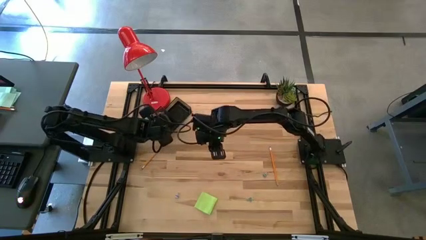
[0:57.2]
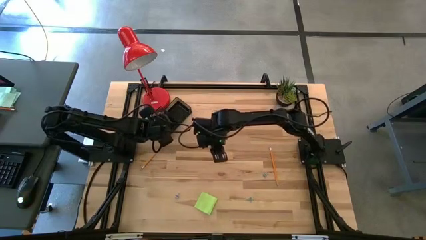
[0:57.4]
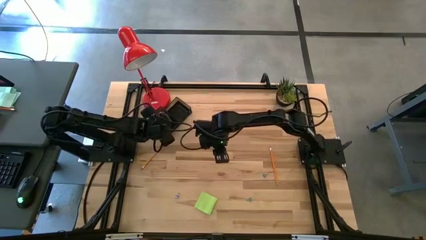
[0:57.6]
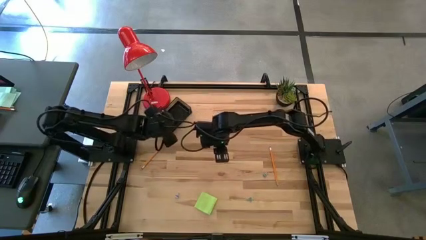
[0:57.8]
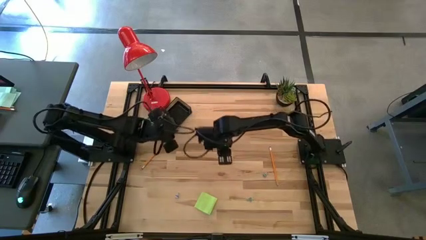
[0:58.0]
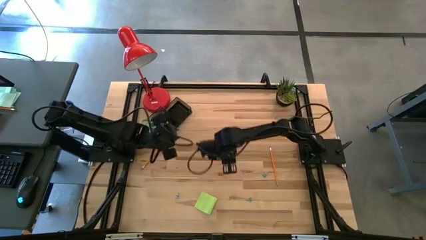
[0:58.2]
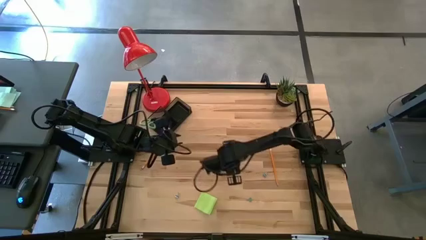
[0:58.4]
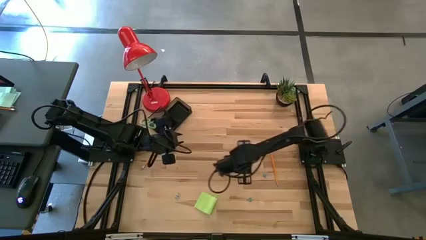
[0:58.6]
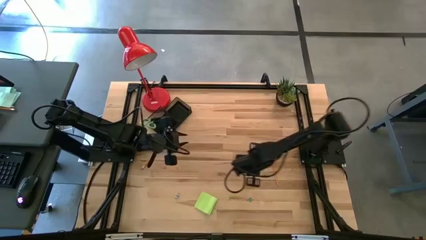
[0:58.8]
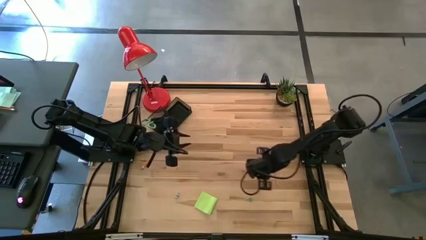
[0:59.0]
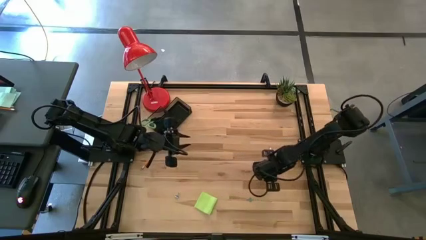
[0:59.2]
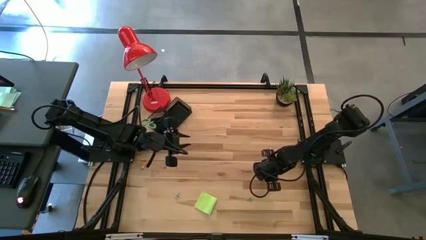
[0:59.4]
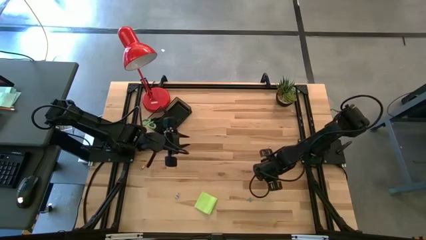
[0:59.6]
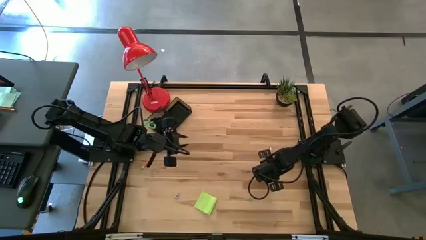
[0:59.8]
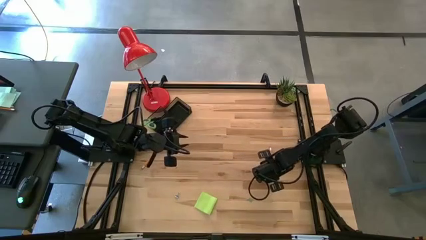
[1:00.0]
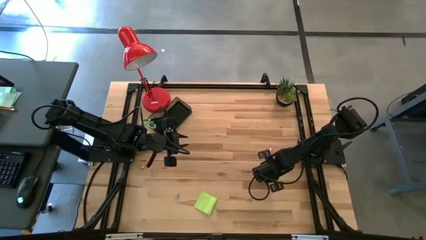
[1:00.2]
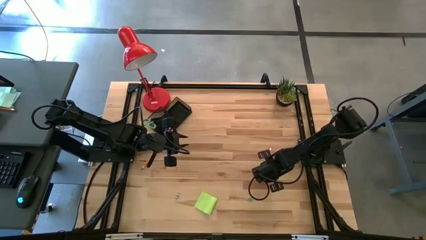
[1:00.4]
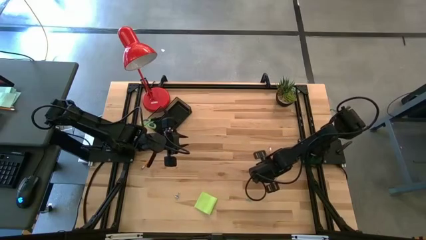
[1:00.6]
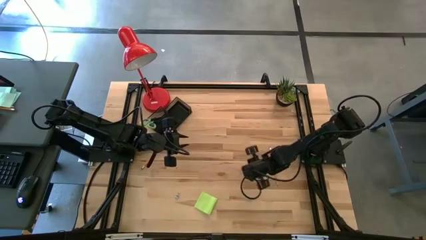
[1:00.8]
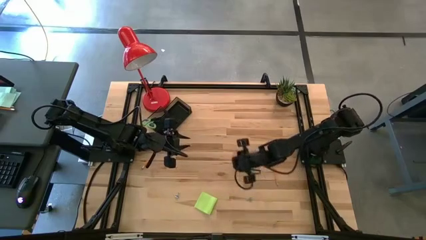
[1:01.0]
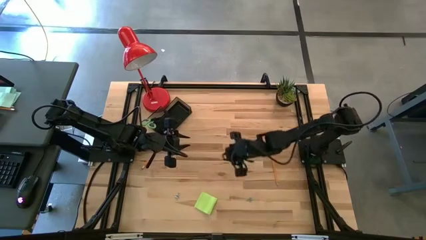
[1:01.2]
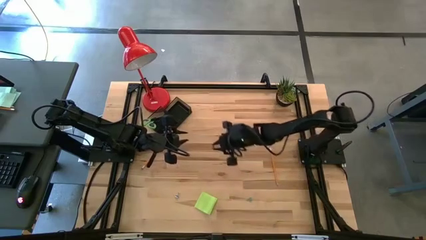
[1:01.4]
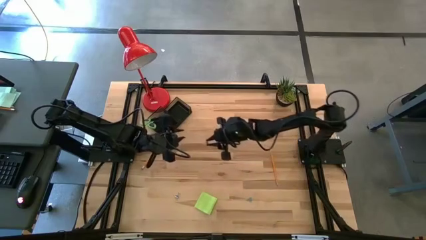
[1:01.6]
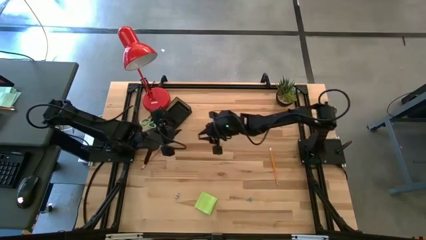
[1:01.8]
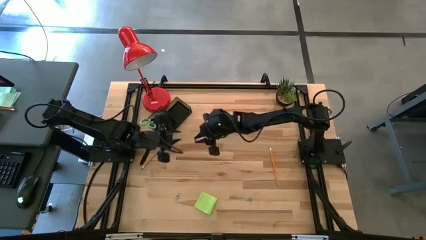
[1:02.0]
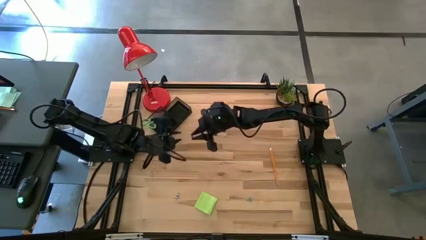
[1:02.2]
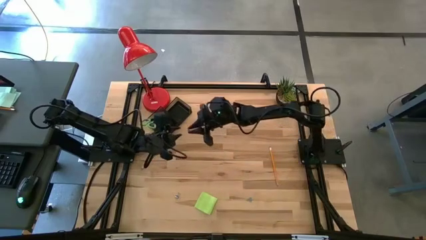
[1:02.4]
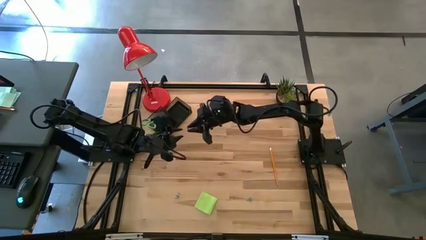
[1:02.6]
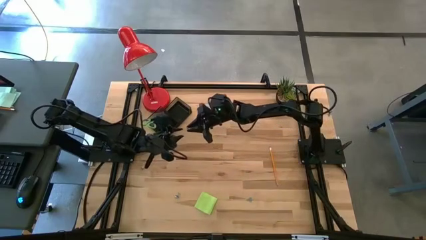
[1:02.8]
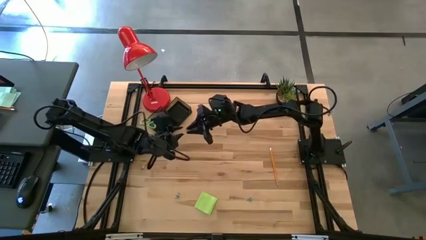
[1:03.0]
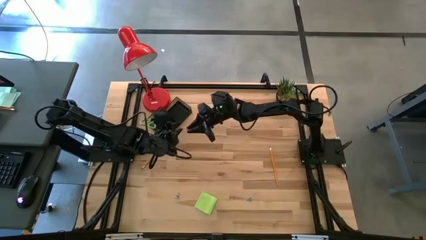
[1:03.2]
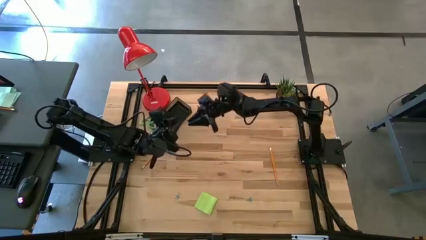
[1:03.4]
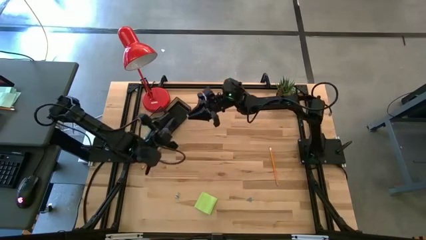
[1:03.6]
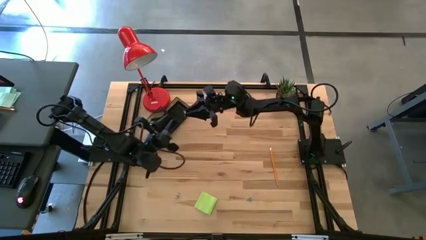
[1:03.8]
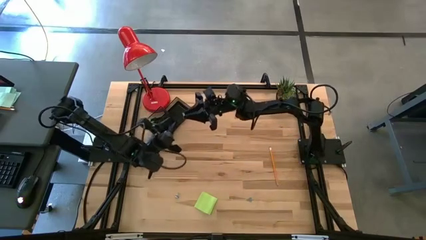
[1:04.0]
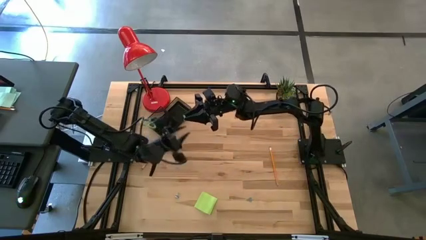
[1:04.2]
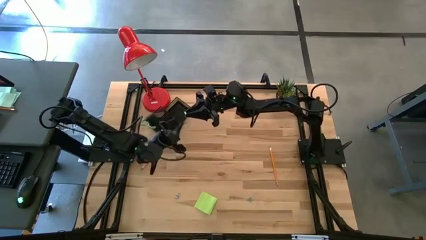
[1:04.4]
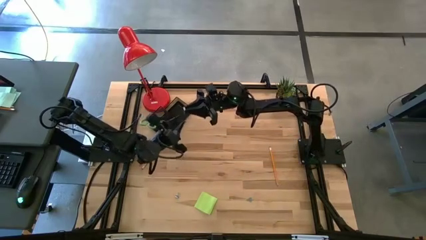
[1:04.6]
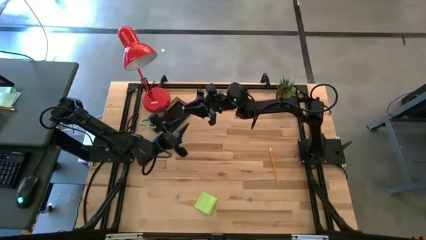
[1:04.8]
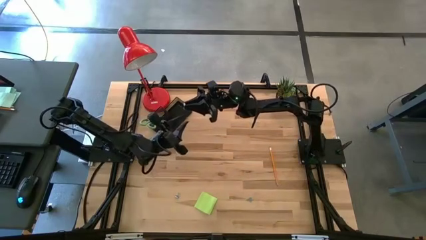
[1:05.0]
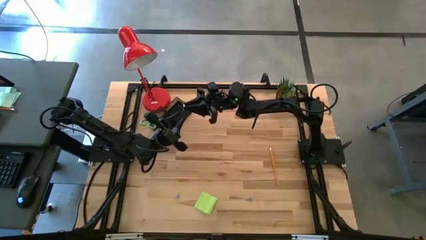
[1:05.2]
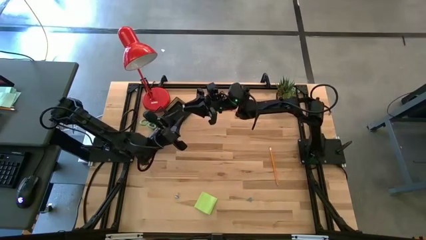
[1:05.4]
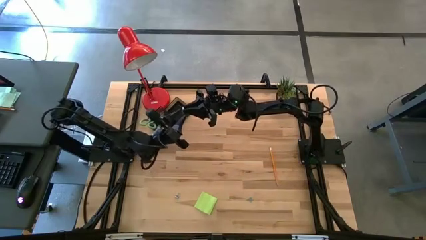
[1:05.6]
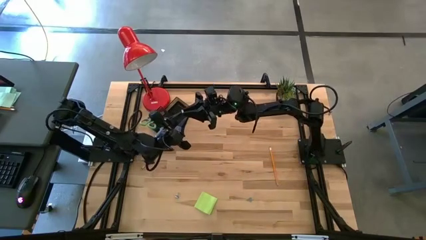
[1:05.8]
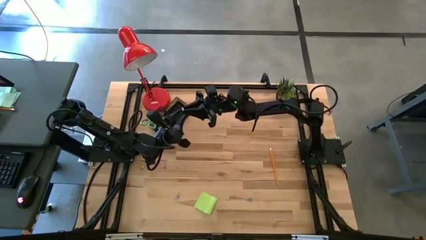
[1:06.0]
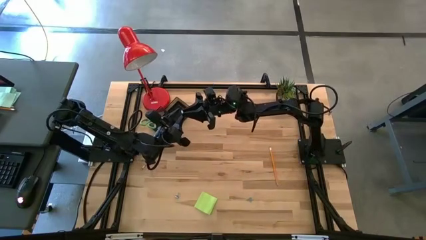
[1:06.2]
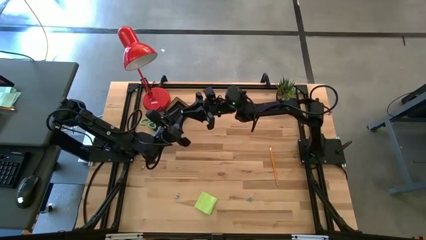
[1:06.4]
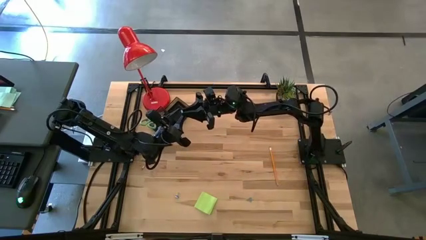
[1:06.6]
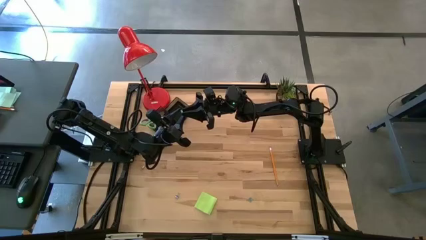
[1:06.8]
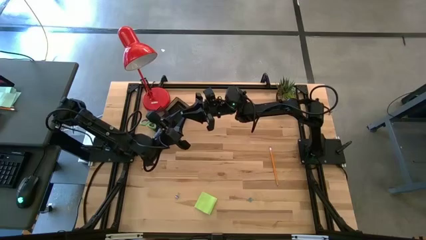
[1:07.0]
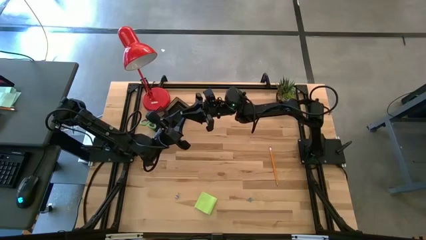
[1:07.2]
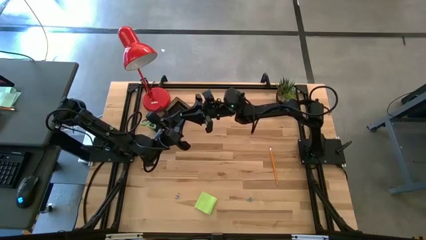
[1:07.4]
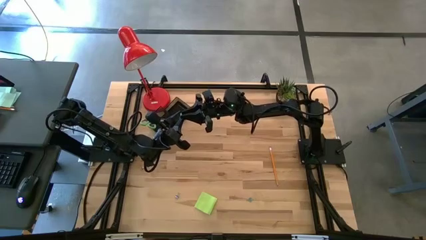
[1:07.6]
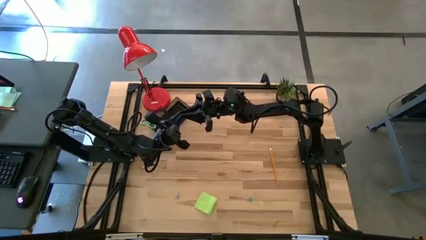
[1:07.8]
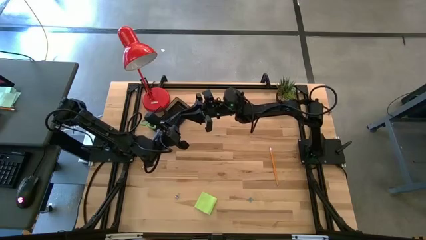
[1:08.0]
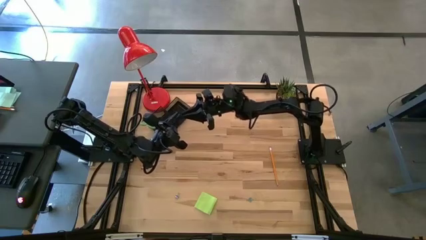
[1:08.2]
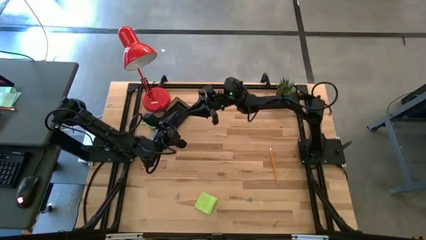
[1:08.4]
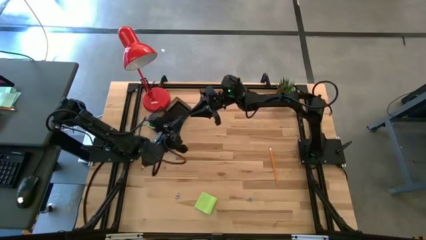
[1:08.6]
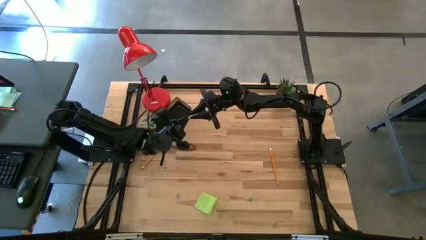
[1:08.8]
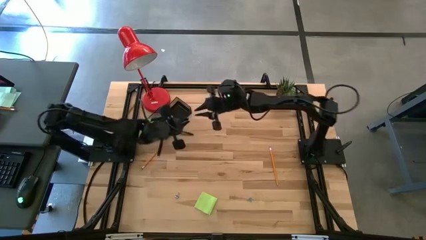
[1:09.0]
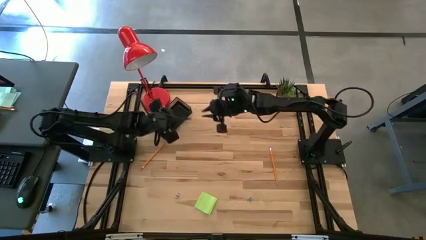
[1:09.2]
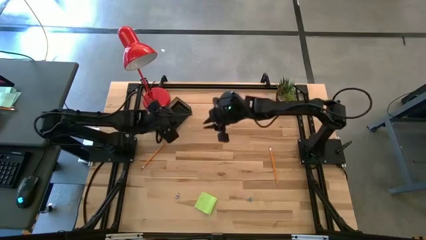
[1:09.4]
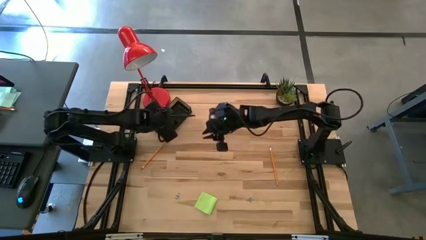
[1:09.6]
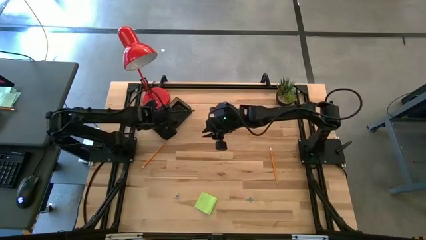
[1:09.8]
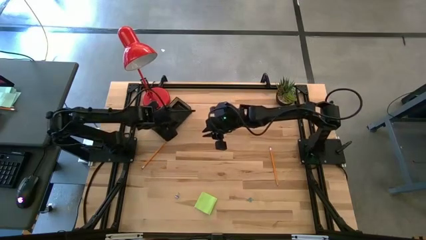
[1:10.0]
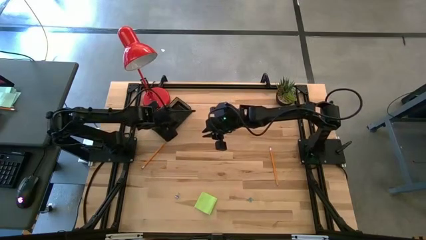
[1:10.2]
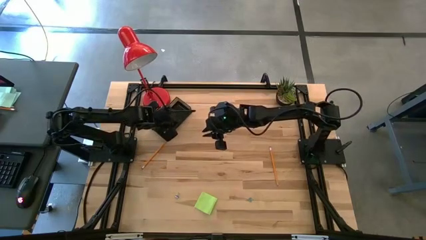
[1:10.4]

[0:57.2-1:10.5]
Task: Pick and place office supplies into organizer
Put the top blue binder clip into the desk organizer

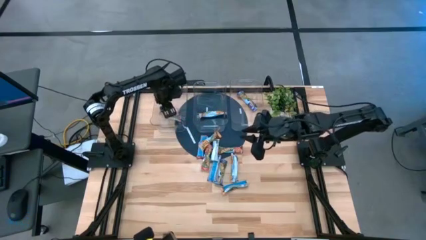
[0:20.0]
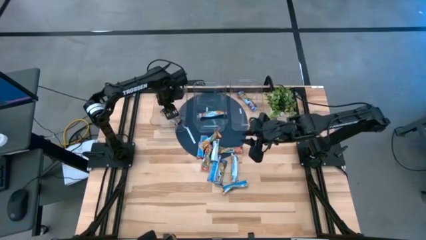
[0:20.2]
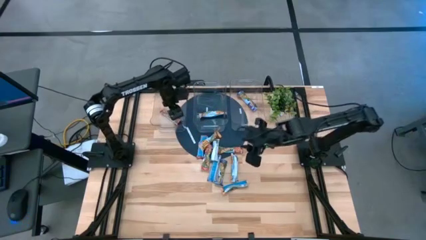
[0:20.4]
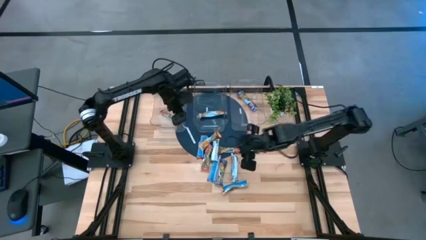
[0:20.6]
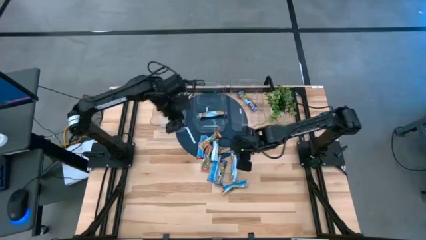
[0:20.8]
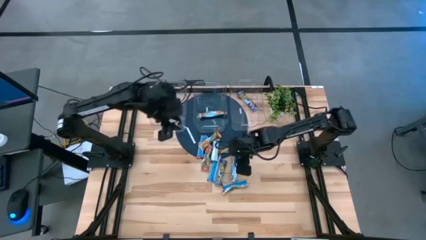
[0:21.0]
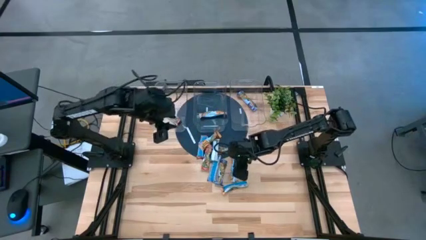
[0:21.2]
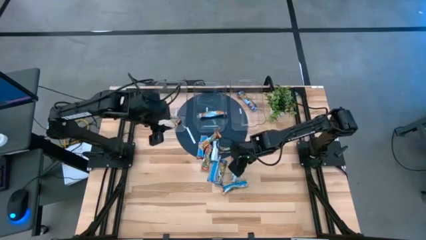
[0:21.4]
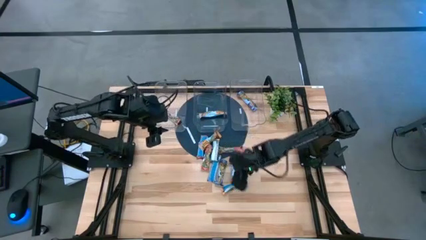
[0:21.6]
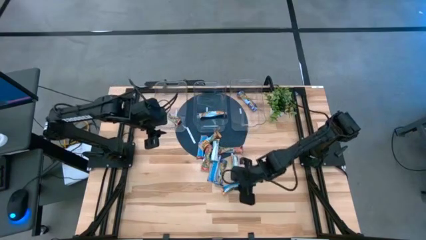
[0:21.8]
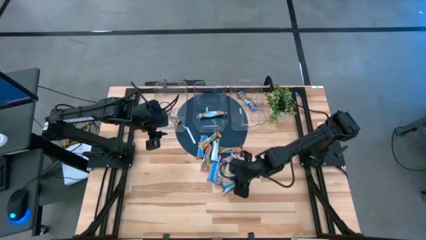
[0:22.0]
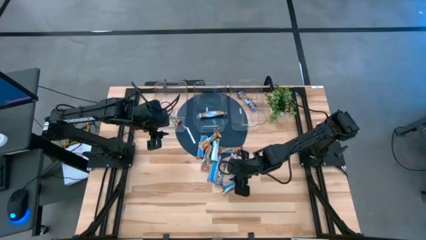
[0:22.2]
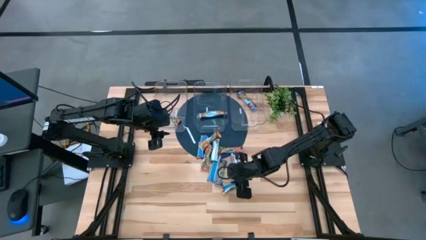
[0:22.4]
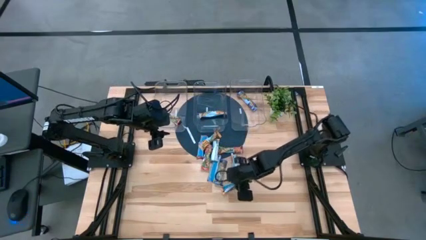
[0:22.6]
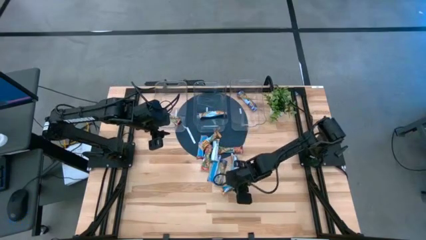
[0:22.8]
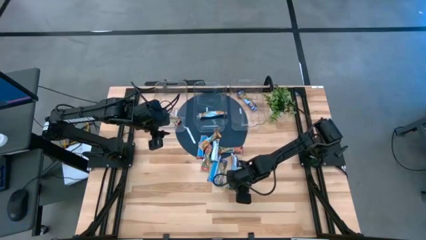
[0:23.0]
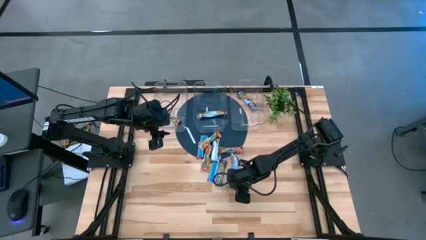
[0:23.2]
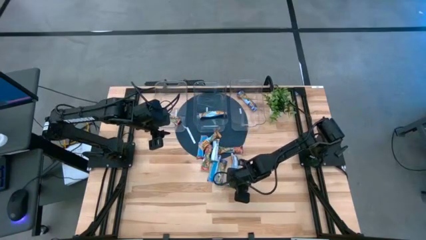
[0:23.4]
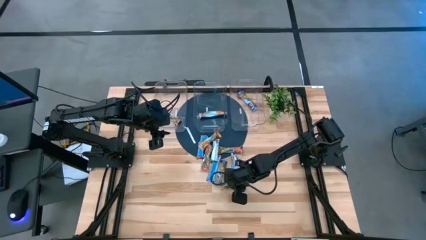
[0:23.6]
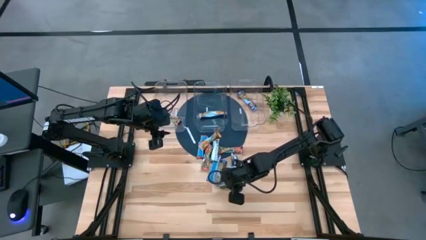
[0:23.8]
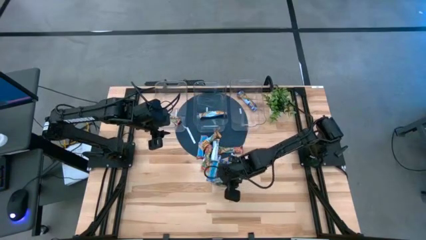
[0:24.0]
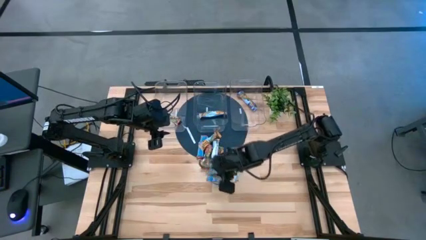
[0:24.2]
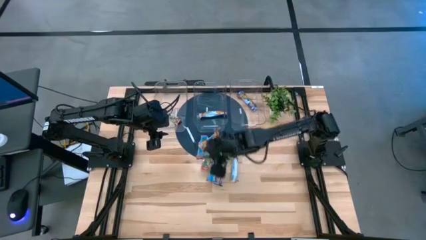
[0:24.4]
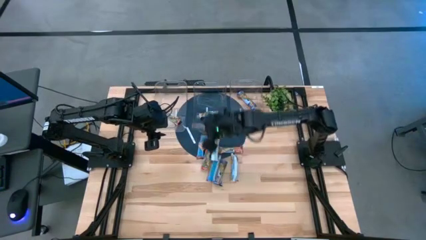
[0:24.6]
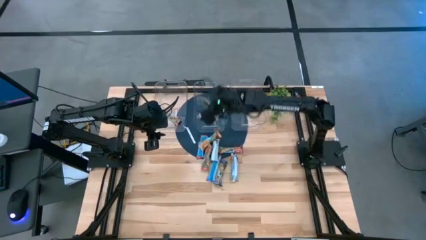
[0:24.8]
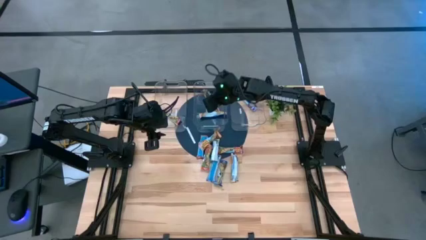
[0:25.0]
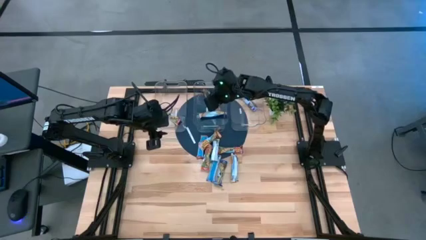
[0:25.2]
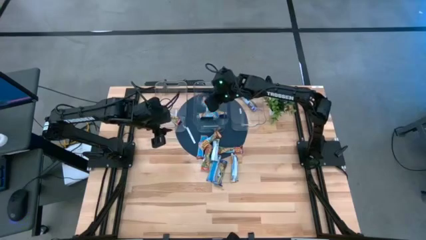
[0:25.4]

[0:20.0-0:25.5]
Task: Pick and place Granola Bars by type
Put the yellow granola bar into the middle transparent bin
